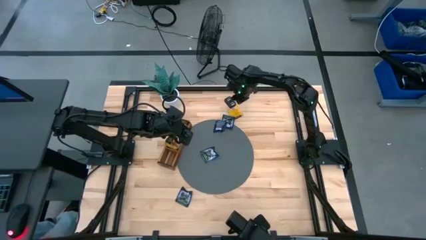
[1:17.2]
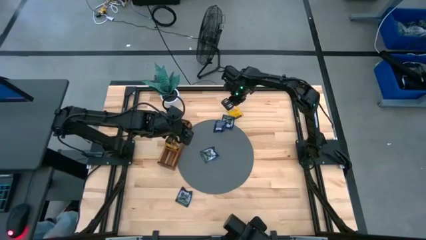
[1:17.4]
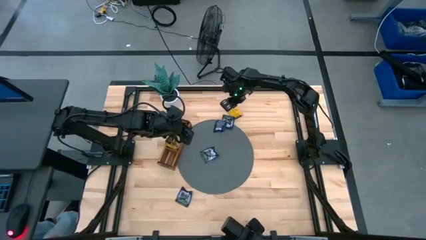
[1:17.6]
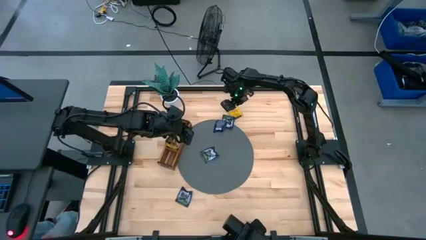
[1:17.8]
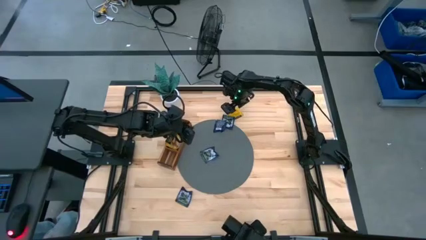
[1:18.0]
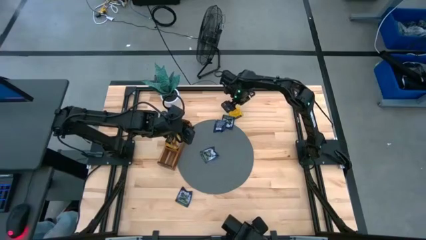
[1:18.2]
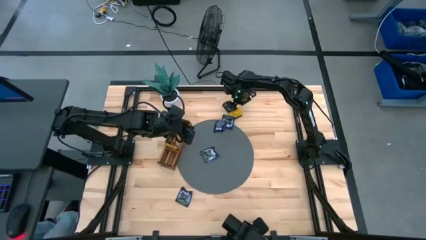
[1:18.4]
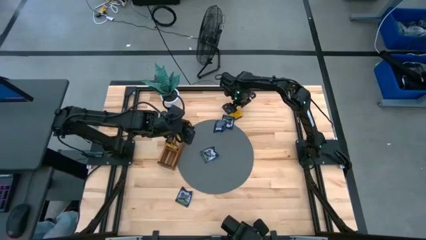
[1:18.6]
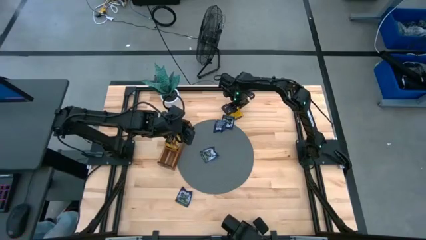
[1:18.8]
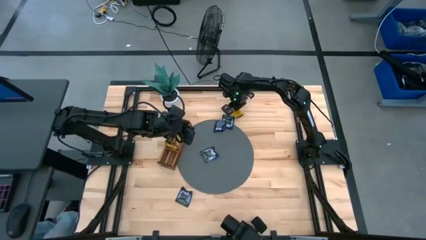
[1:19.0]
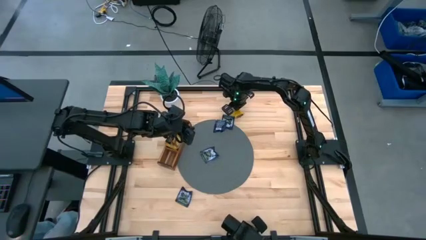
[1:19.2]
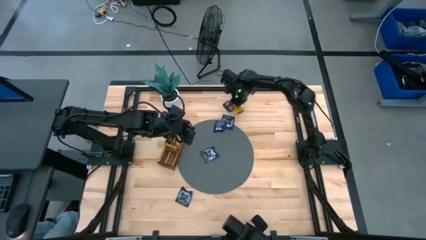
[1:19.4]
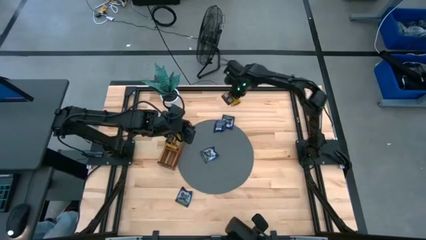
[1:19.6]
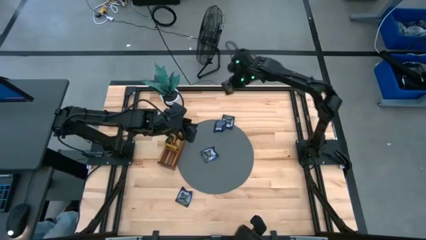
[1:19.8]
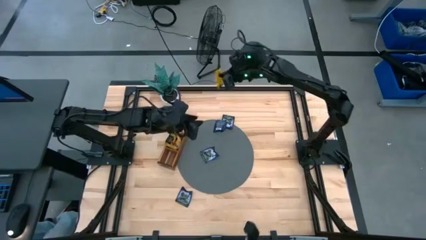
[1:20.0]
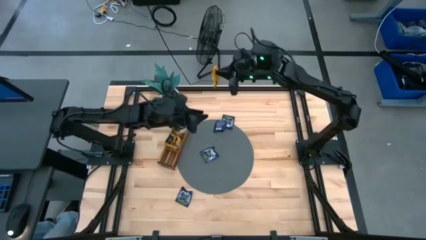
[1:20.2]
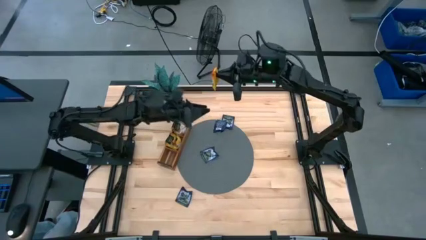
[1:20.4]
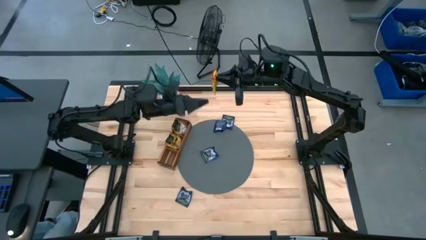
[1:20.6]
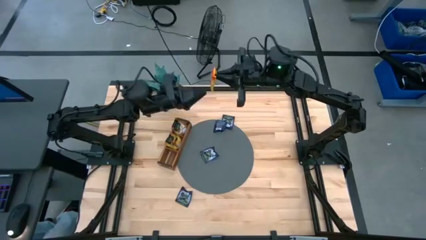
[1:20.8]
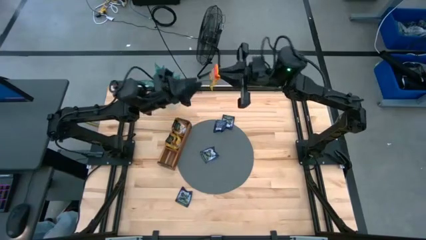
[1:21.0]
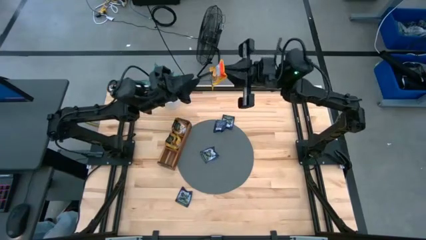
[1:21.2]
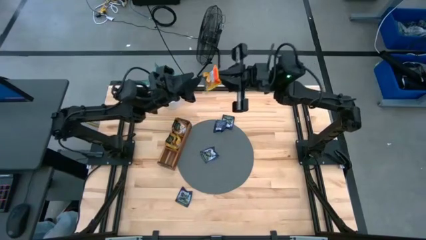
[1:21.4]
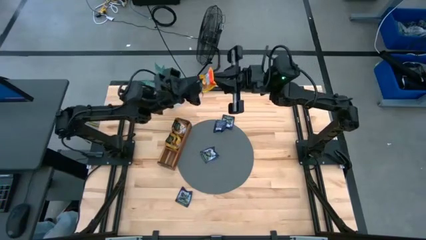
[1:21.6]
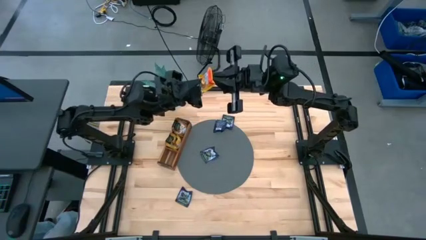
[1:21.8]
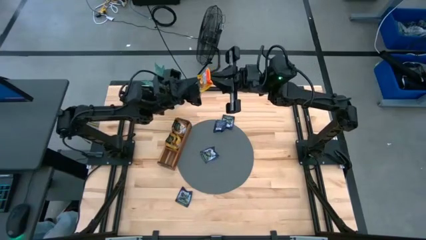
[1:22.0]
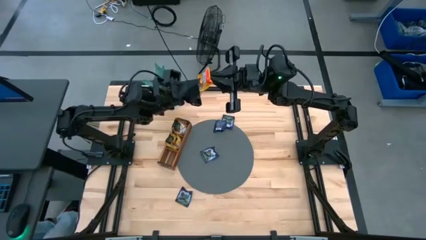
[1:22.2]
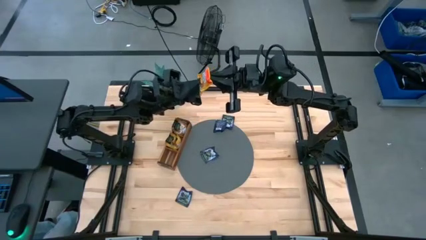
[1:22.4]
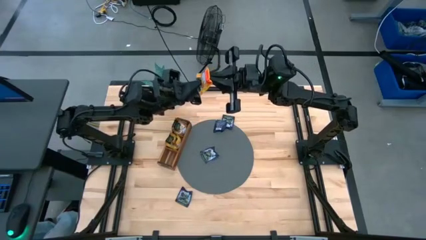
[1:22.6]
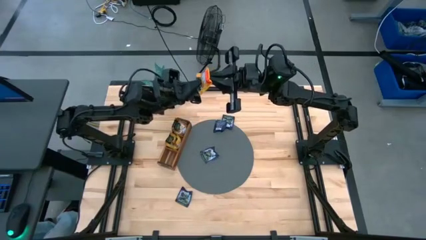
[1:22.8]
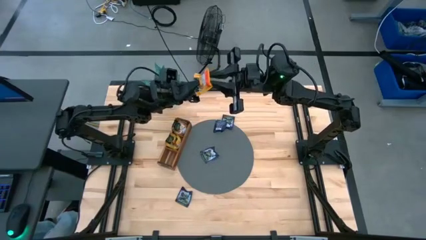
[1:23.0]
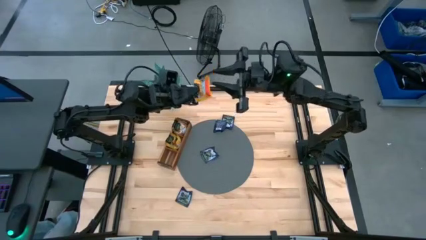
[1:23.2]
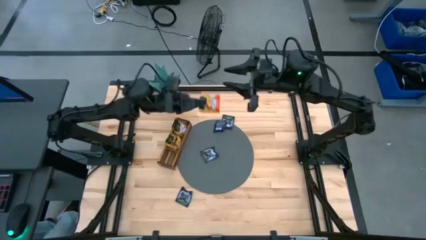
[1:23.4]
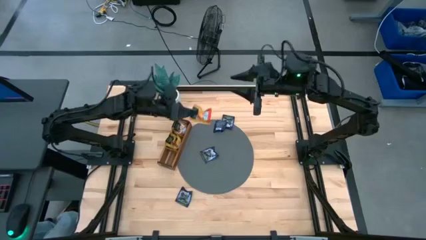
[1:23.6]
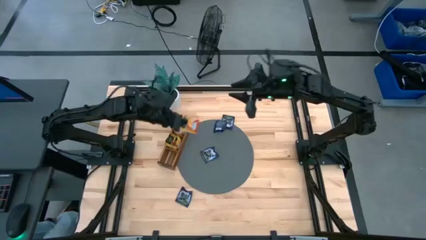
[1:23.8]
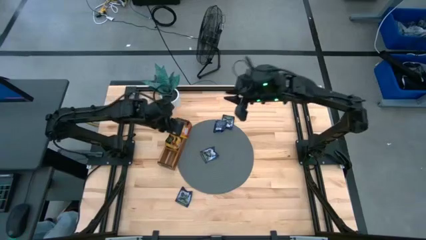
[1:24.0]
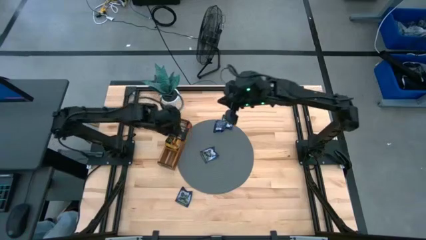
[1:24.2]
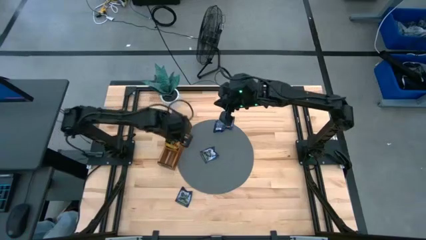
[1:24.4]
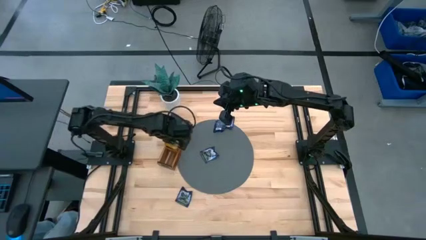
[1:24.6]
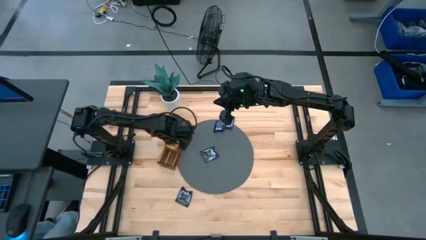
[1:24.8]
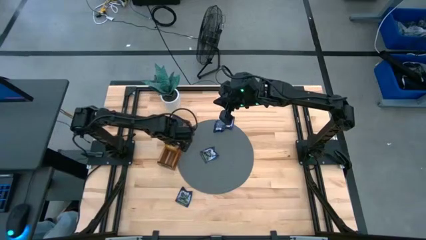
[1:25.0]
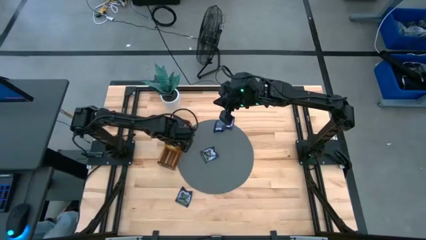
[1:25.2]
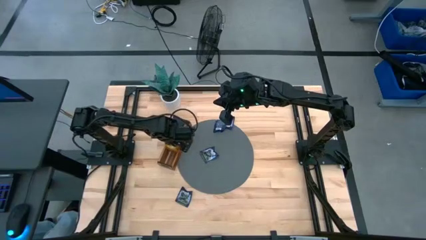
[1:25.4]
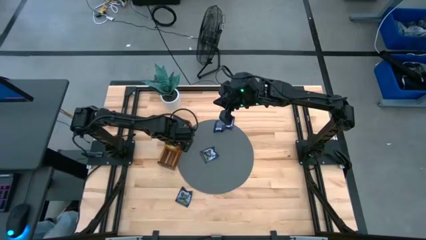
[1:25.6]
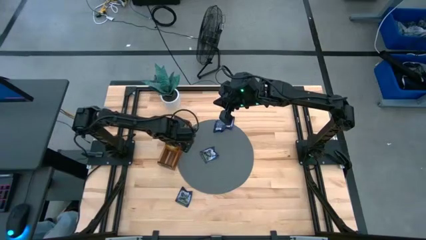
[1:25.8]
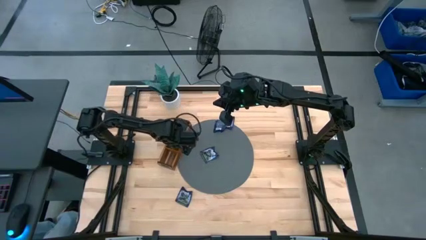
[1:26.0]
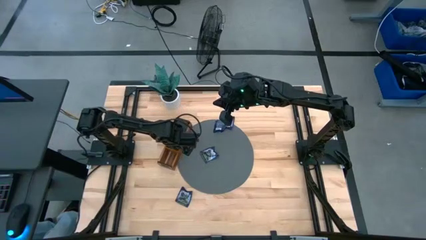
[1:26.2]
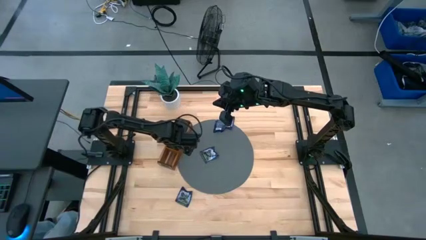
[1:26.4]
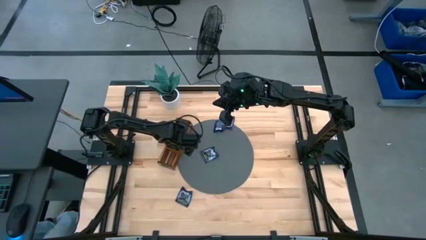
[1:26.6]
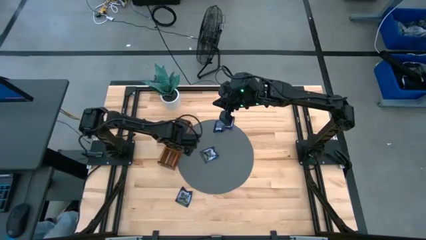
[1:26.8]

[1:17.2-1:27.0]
Task: Pick & Place Tea
Put the yellow tea bag into the middle section of the wooden organizer

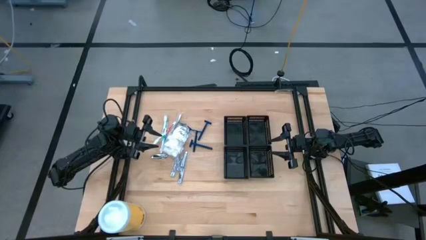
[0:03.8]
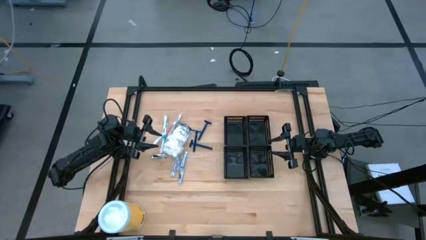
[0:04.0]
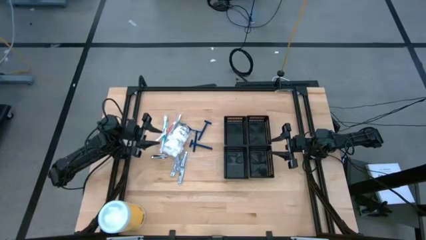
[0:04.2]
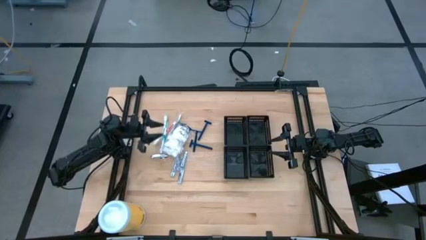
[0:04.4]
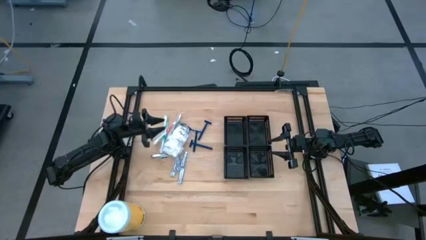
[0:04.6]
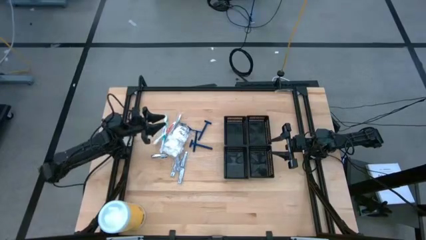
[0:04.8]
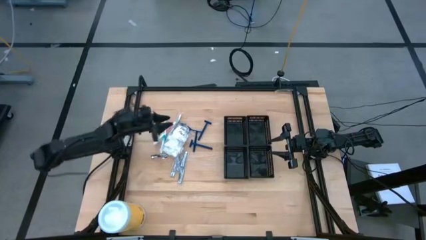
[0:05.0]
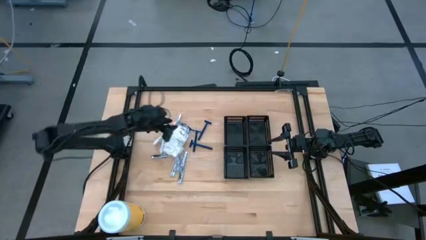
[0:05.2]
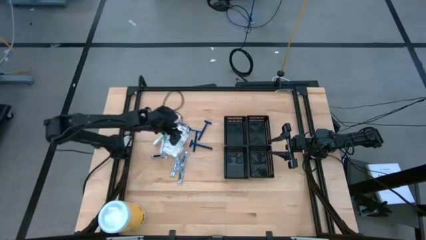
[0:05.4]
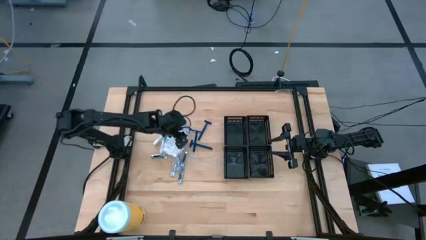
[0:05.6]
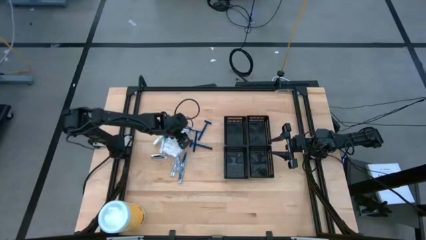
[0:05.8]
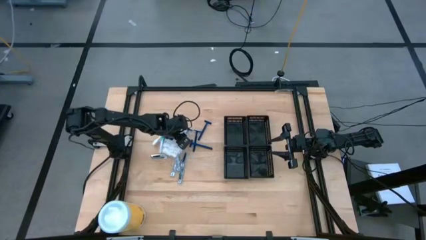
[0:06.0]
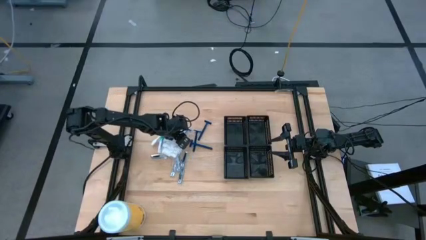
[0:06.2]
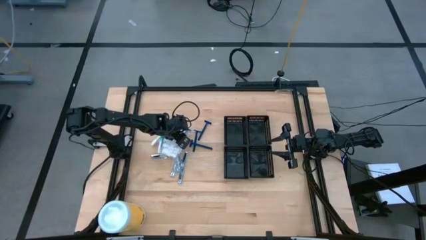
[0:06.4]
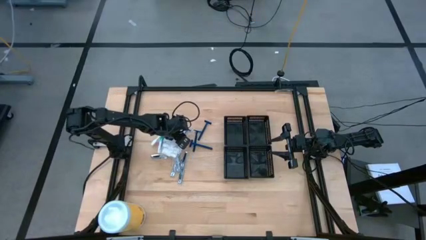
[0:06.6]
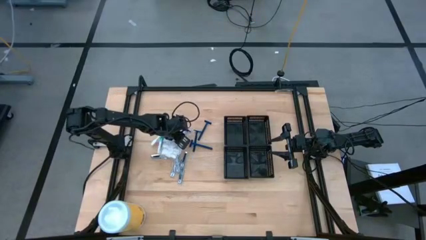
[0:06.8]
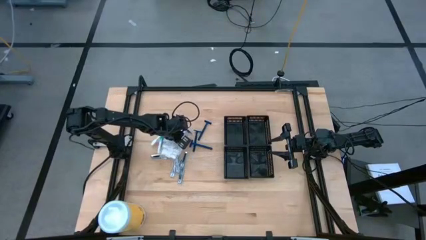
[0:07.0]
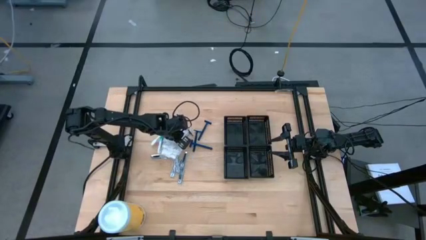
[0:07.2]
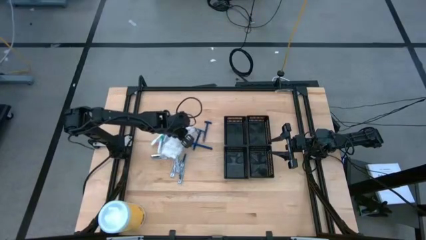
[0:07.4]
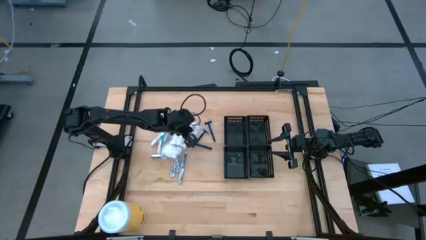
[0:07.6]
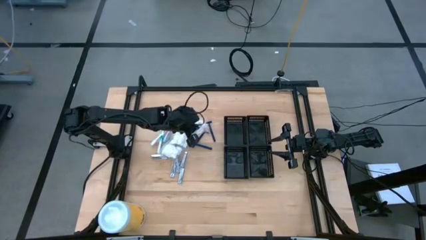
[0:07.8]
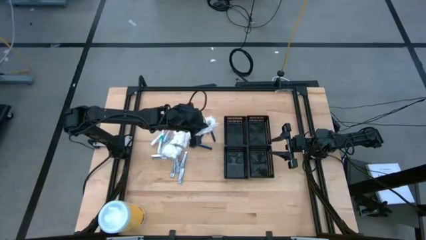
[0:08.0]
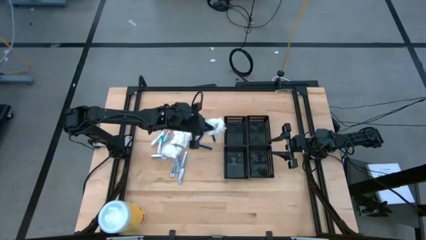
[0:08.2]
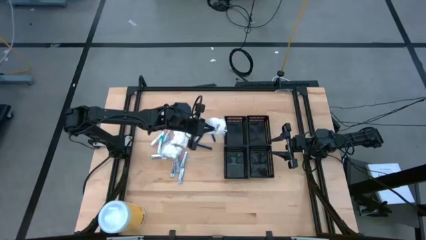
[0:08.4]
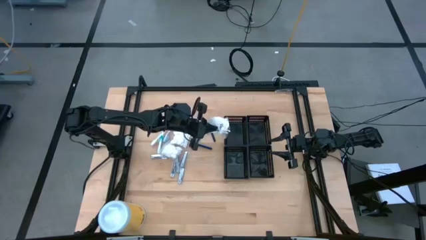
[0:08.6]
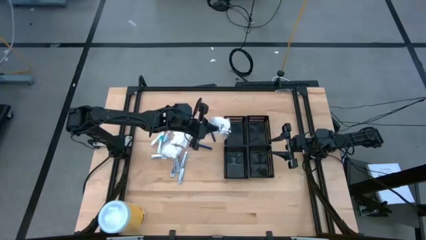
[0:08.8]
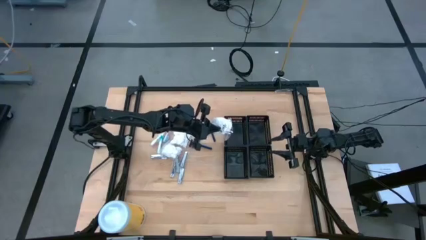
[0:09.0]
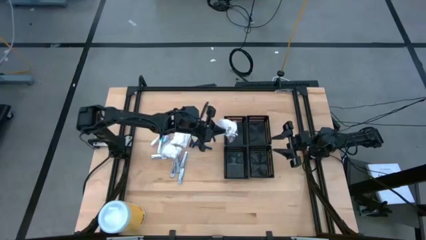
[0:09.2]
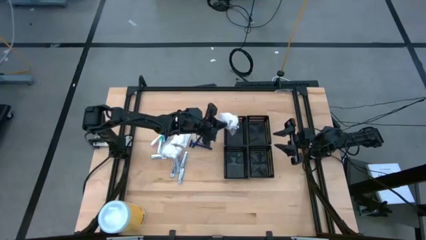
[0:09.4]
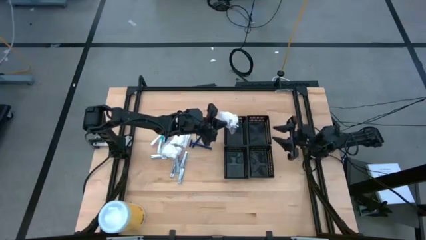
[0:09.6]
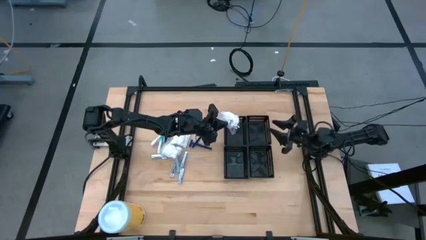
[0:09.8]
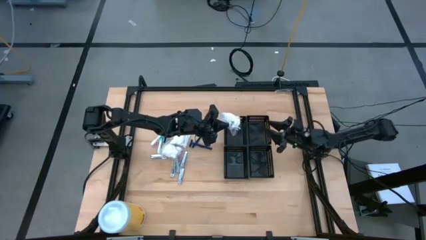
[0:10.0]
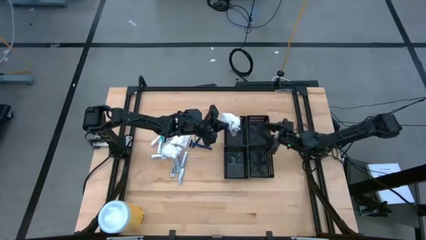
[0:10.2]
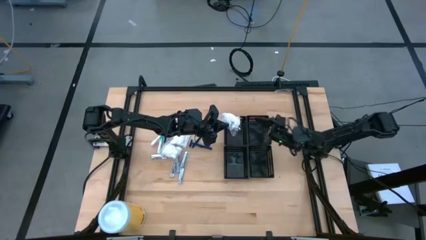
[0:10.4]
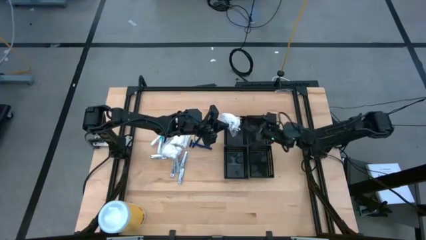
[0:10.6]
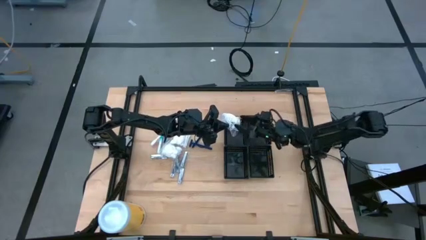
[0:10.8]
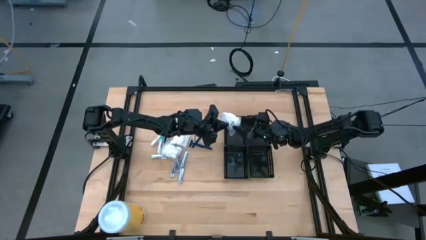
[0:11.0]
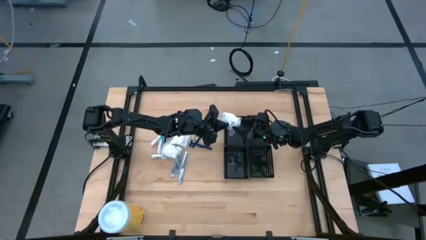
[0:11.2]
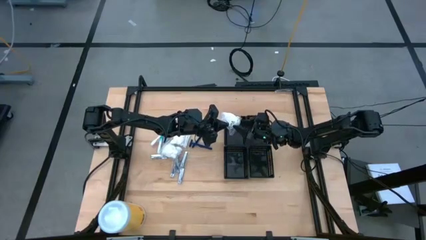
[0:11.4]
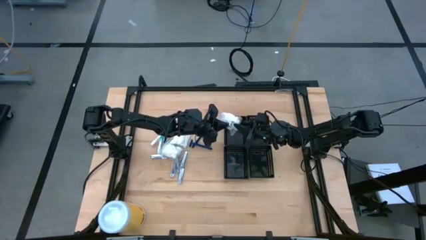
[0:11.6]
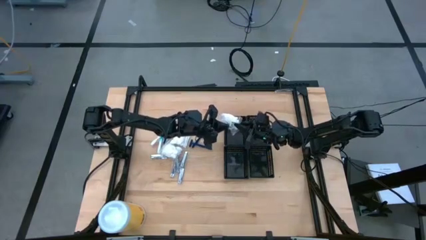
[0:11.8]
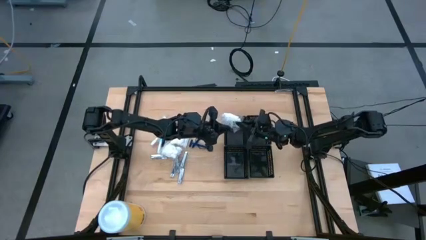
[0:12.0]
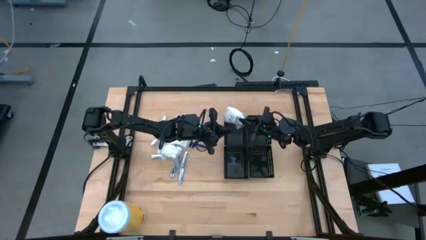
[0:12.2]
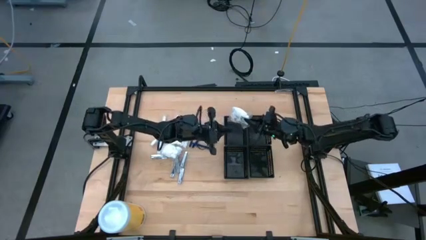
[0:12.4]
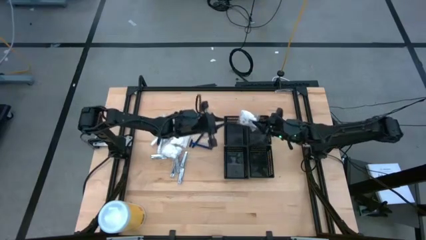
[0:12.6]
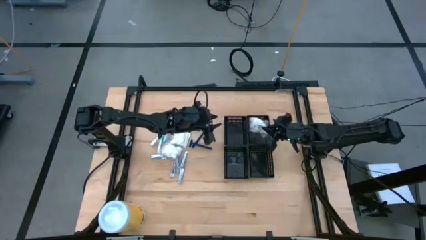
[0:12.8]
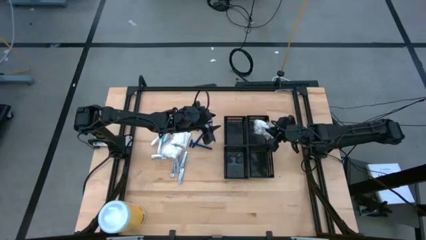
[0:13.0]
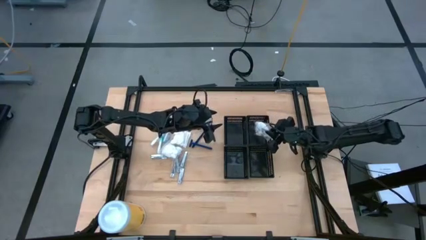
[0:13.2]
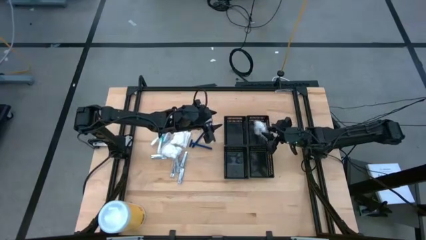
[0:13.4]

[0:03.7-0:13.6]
Task: Pick & Place Travel size toiletries
Put the cotton pack into the top right black basket
